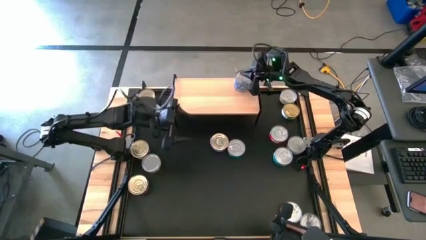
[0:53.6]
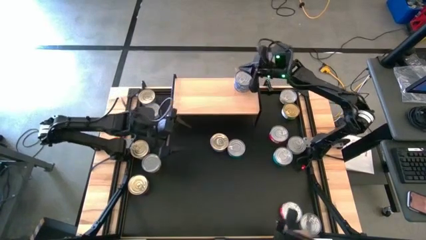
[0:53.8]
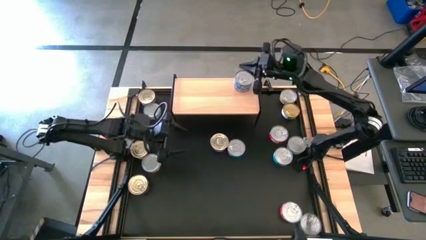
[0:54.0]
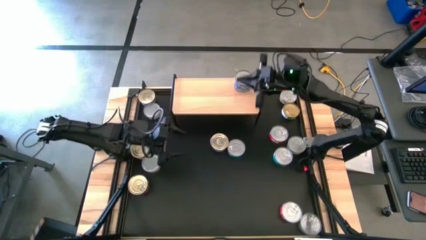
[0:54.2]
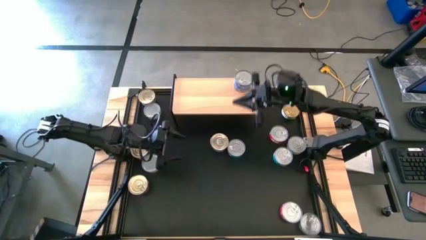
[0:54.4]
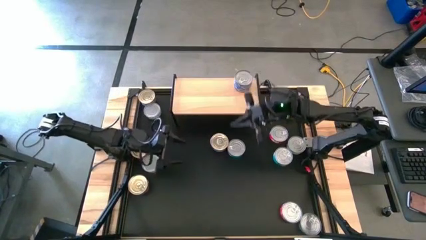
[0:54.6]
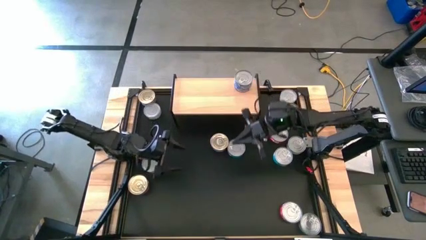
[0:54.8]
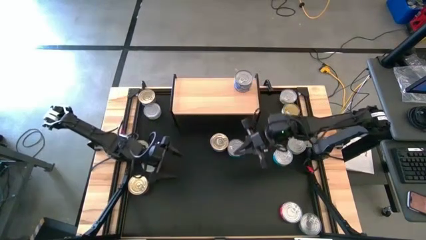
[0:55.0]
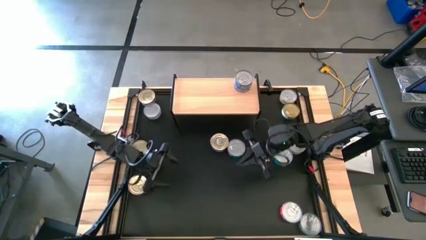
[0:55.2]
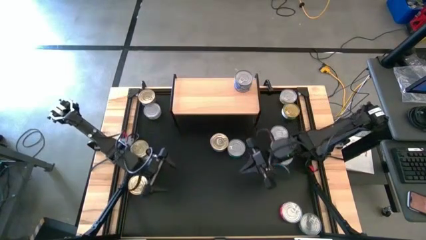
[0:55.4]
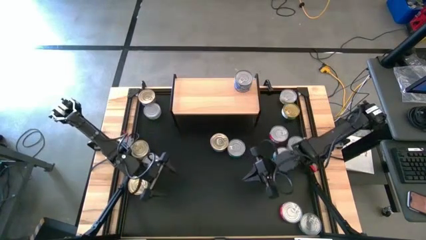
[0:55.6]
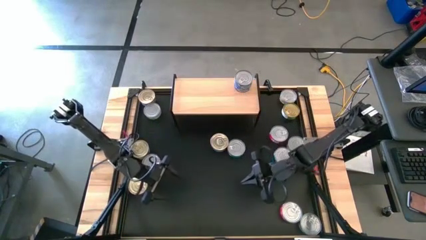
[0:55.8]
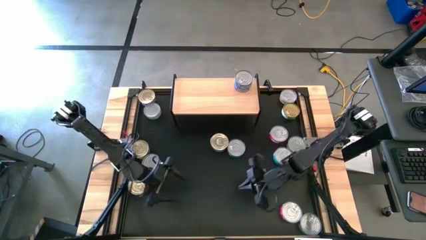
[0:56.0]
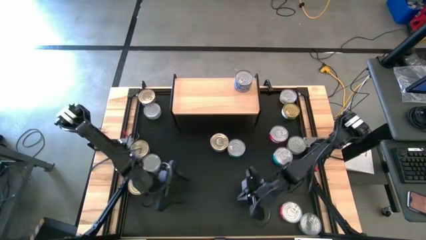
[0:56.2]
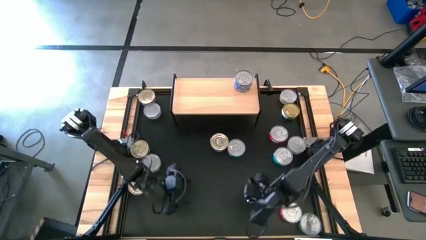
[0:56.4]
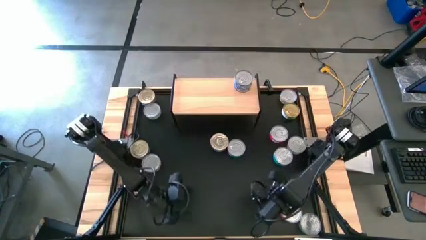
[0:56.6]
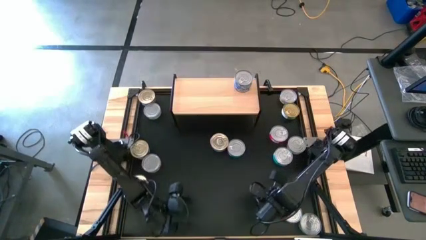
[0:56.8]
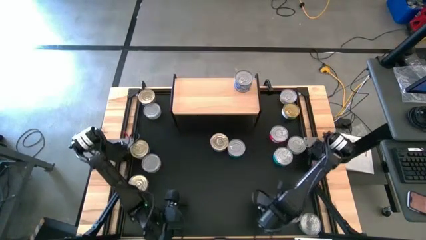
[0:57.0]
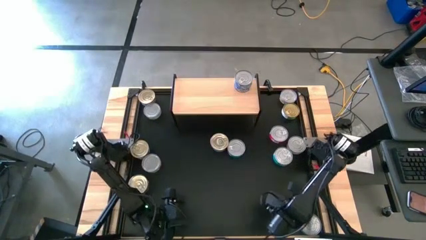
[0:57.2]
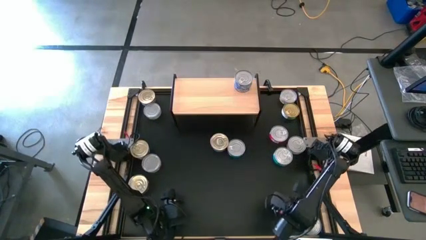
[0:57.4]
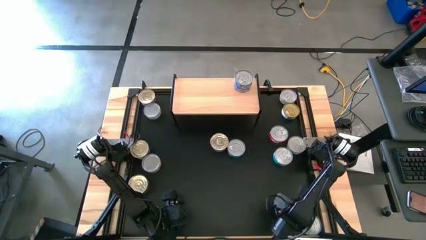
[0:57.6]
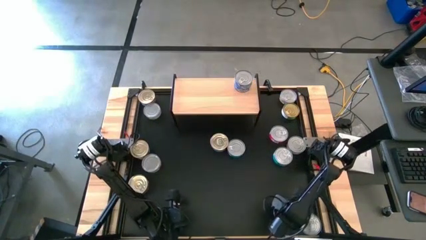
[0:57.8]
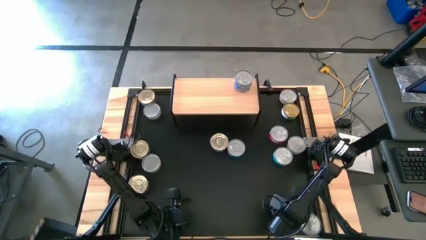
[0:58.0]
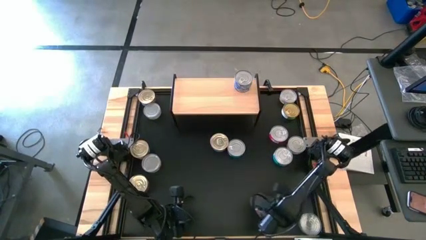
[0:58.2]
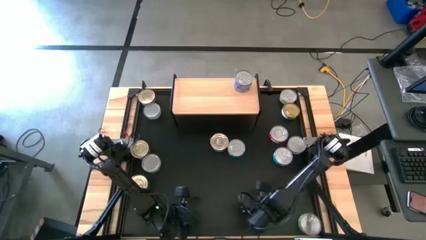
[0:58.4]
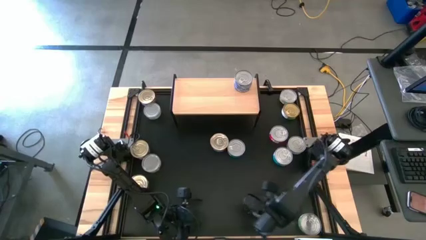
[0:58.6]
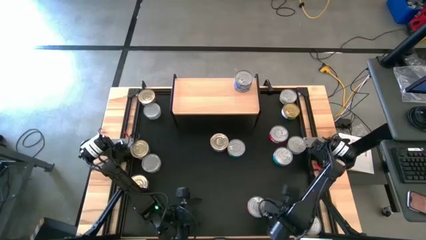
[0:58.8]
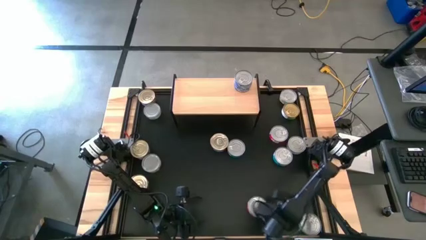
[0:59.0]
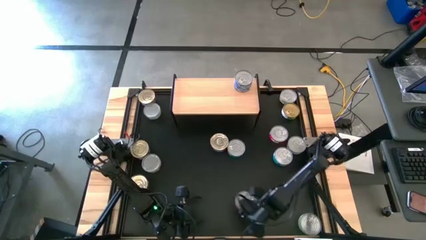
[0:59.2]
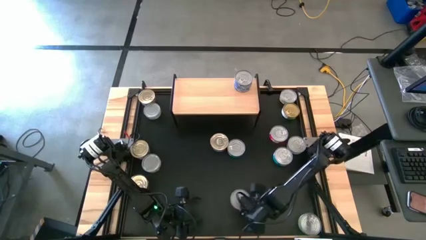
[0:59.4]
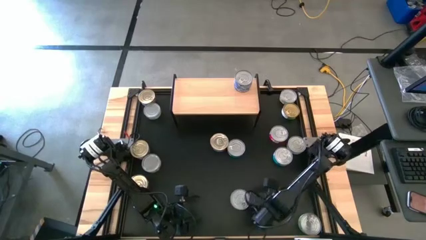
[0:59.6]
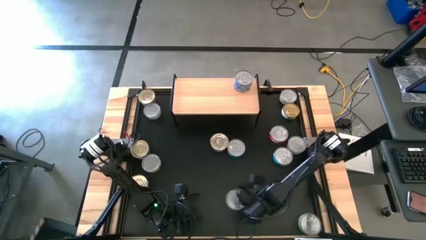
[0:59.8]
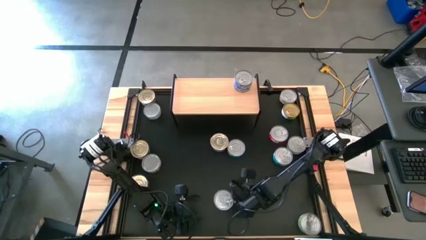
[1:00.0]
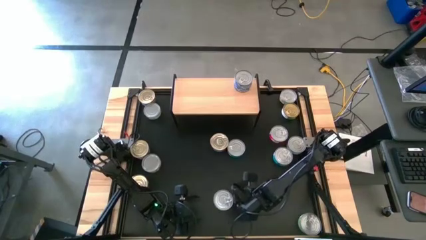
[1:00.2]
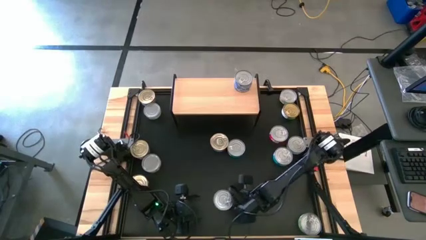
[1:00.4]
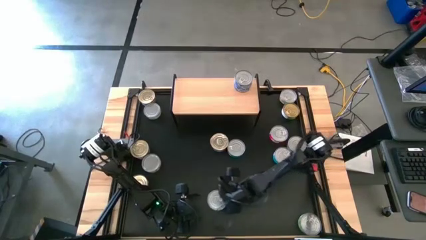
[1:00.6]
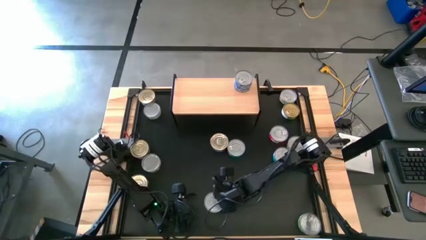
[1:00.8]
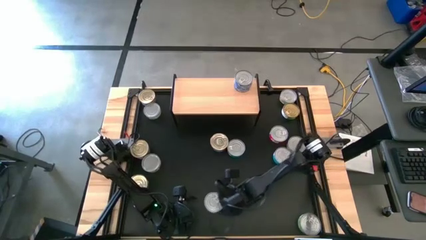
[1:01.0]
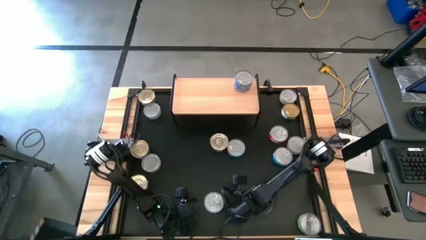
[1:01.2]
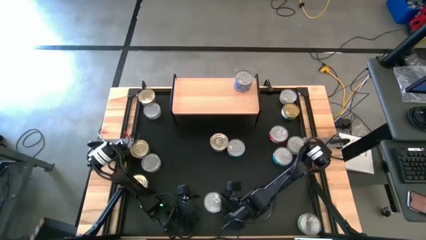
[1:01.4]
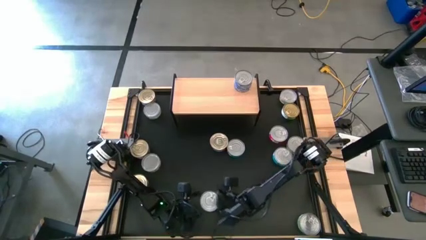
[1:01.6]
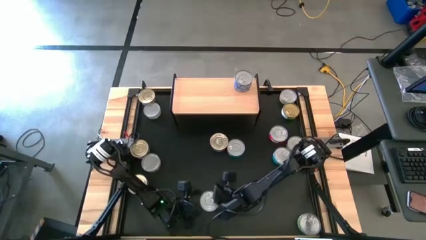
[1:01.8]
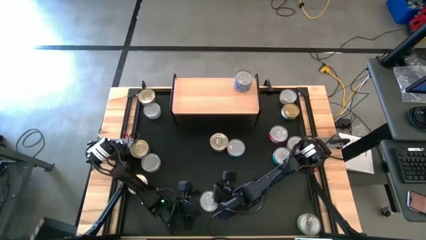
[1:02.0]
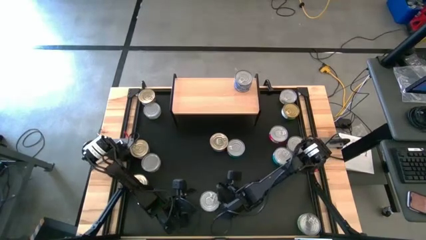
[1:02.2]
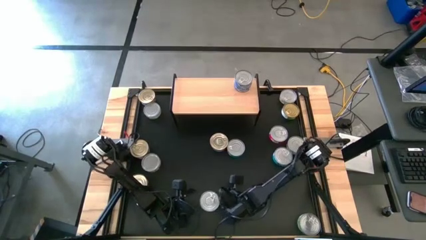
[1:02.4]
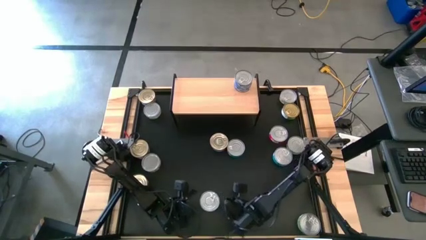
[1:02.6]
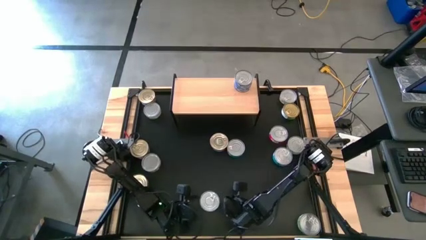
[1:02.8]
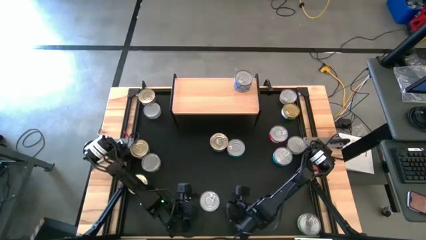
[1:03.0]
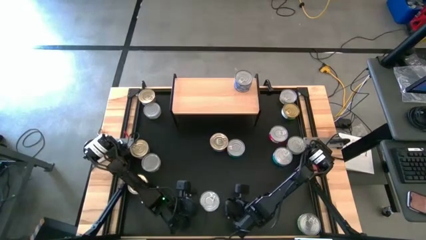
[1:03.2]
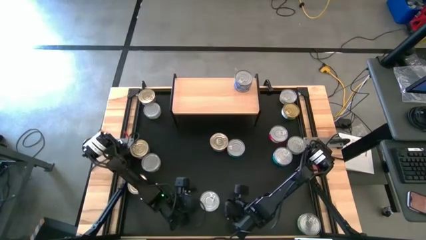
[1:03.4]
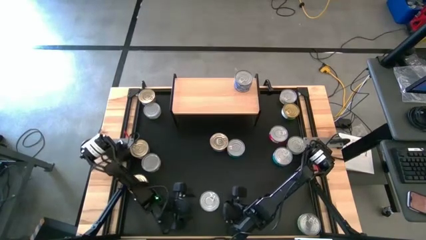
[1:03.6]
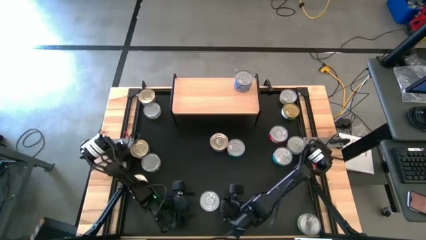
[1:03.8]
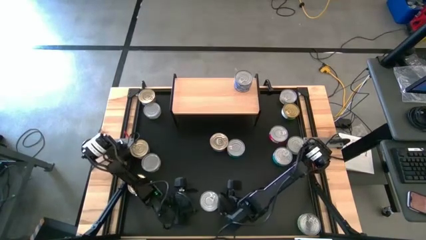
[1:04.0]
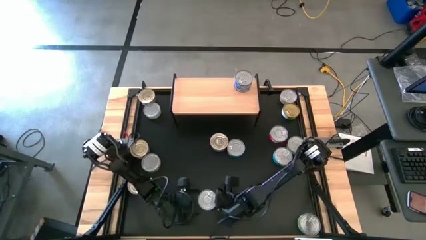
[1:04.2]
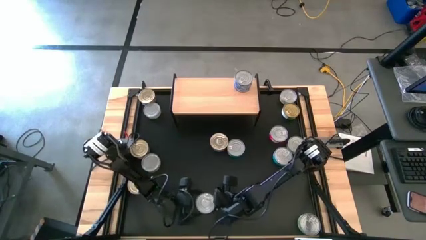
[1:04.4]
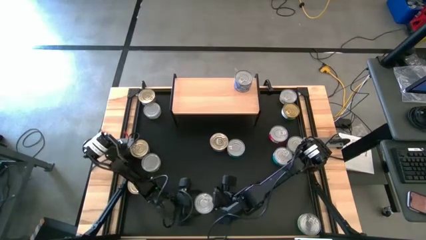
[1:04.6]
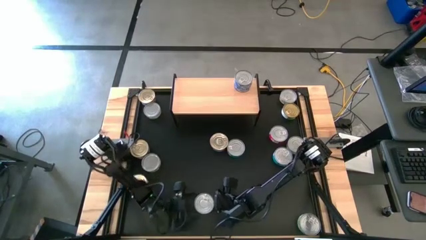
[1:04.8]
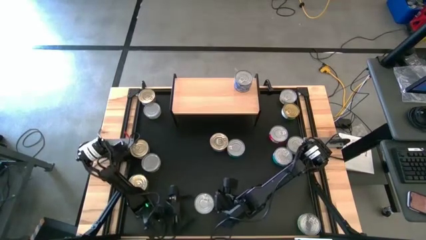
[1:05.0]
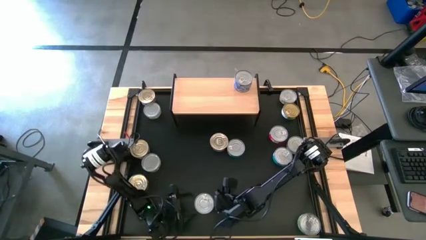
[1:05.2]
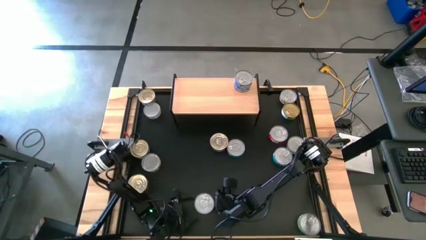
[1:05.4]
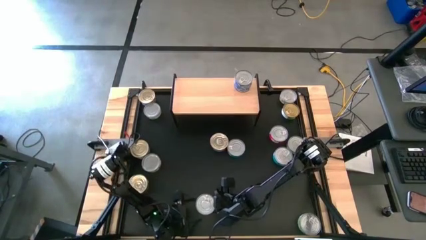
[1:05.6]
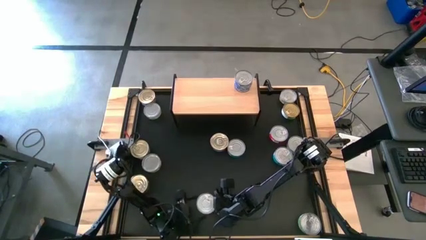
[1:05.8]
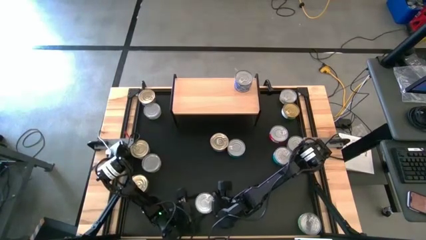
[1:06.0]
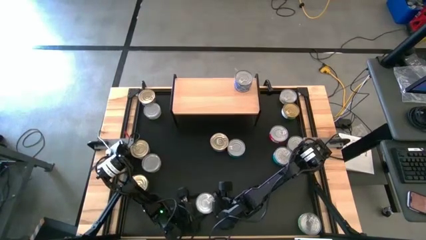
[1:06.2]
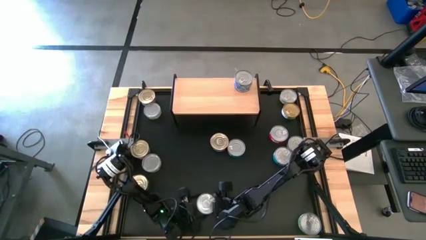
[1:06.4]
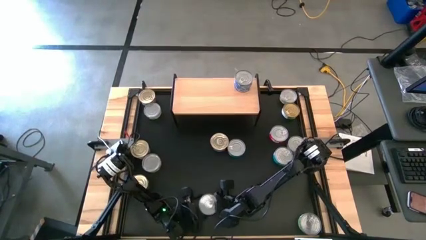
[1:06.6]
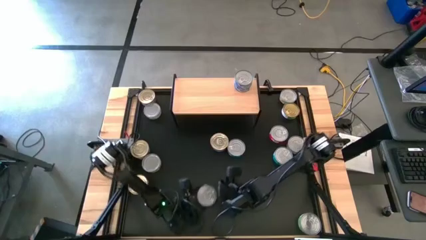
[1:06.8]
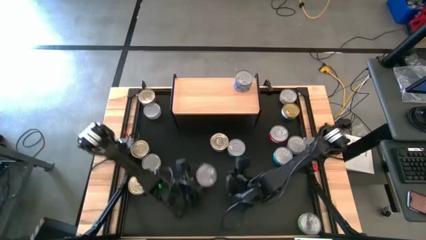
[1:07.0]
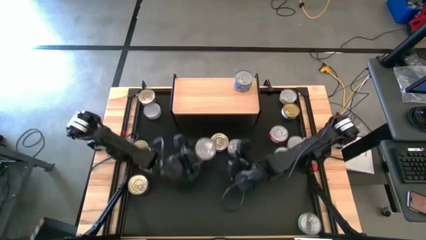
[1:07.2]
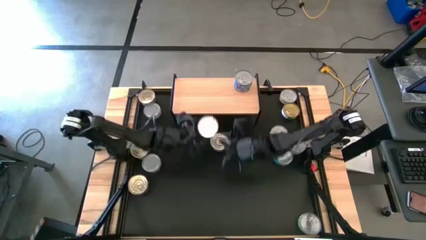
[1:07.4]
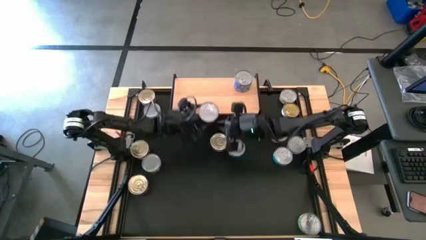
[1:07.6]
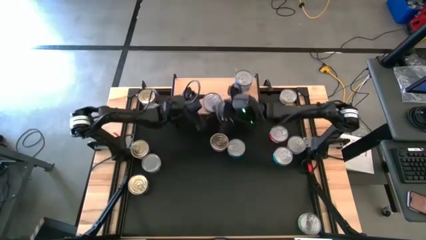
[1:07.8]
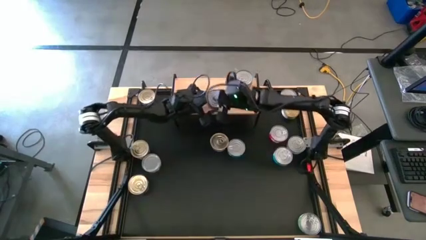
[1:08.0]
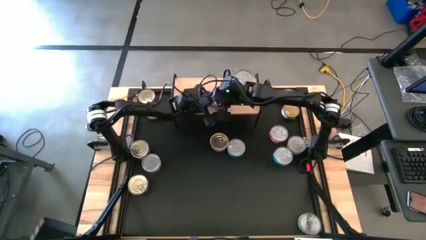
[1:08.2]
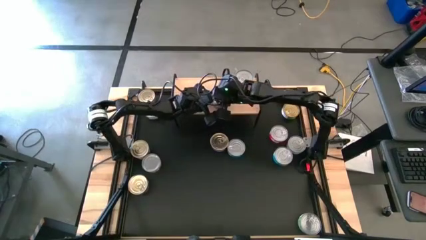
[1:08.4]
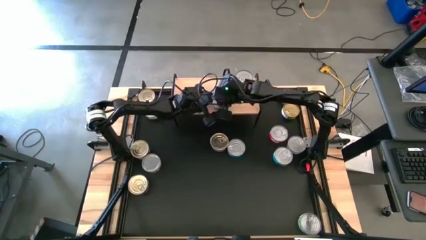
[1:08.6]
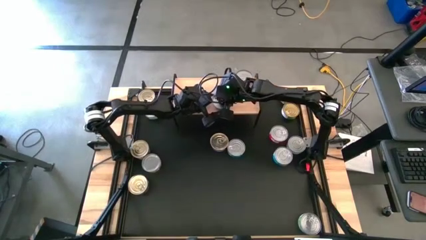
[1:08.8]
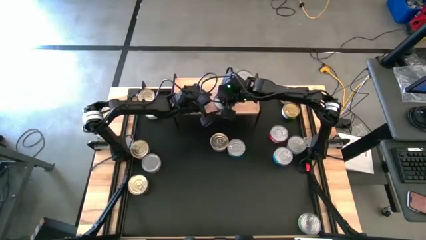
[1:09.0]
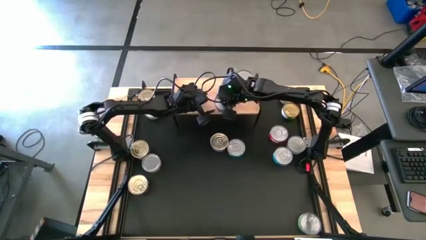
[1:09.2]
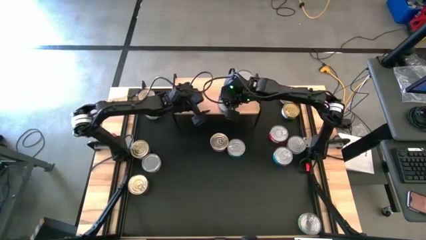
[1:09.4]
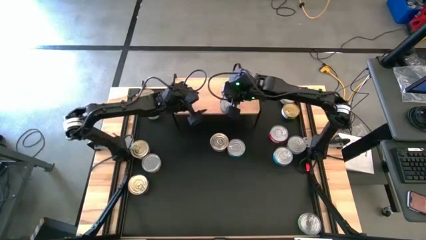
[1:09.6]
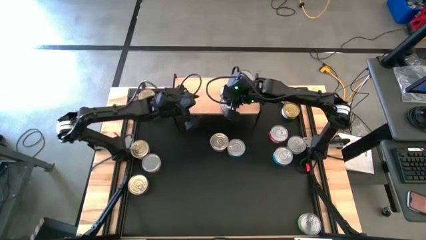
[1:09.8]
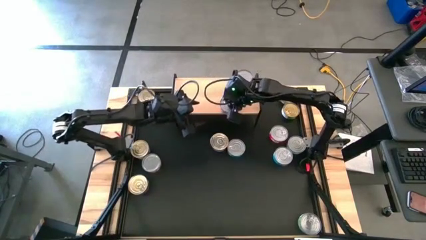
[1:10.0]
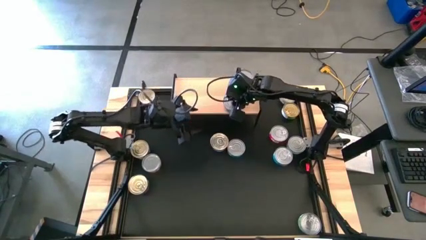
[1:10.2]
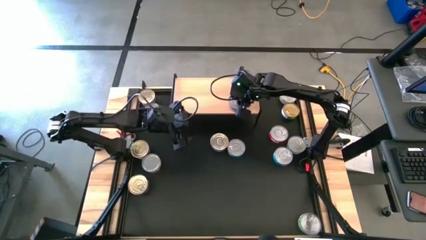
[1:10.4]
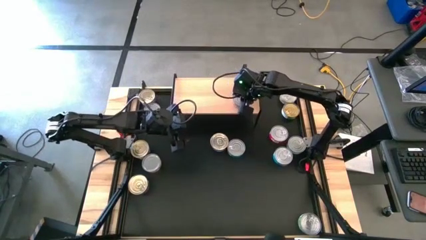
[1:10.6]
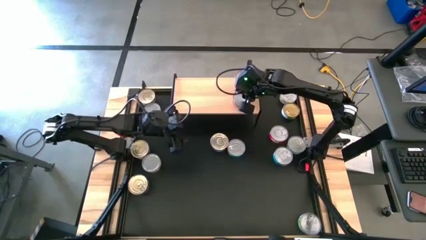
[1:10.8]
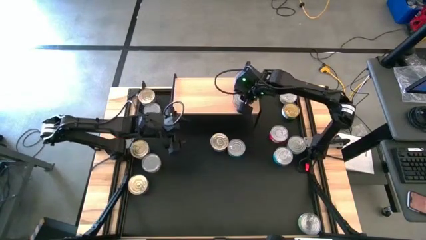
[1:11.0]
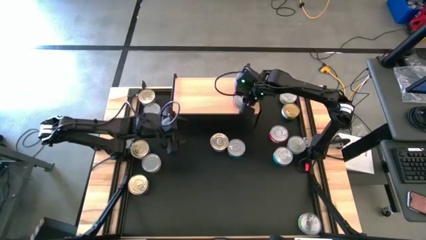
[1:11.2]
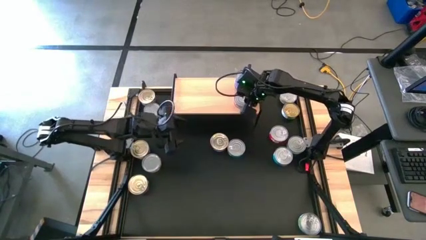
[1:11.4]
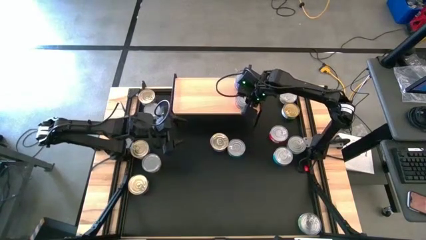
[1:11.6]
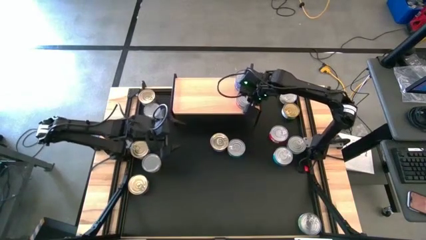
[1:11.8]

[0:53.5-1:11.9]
Task: Stack canned seafood by type on shelf
Put the red tuna can on the shelf
